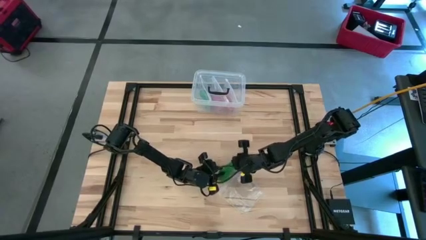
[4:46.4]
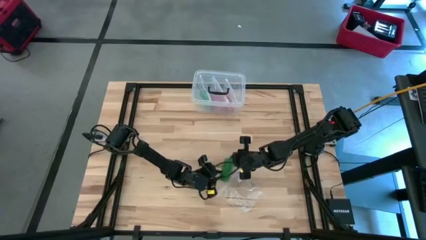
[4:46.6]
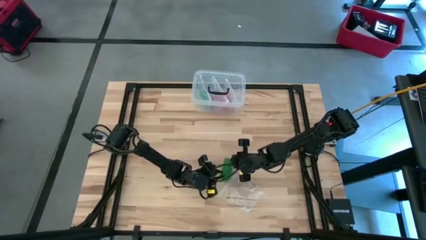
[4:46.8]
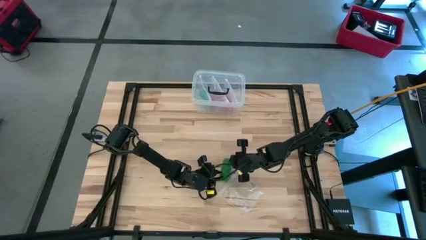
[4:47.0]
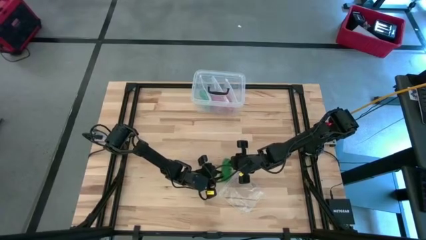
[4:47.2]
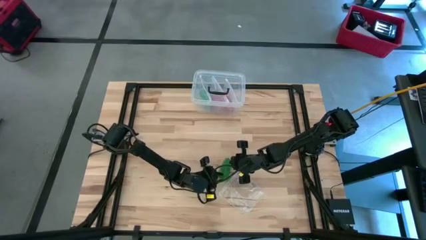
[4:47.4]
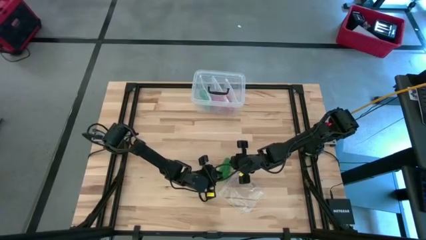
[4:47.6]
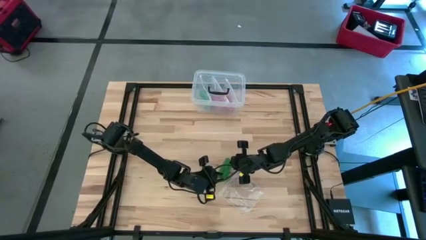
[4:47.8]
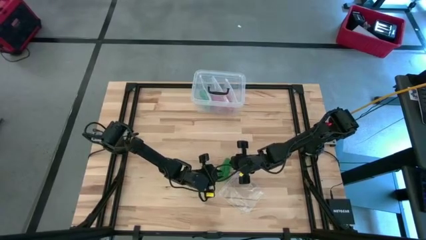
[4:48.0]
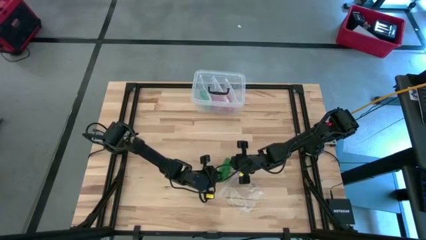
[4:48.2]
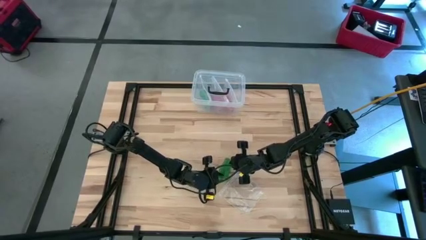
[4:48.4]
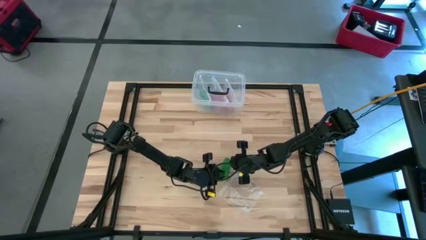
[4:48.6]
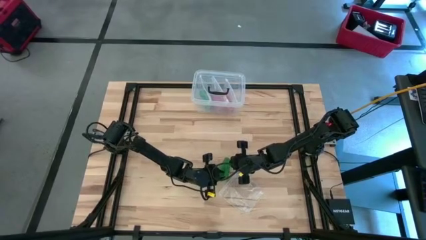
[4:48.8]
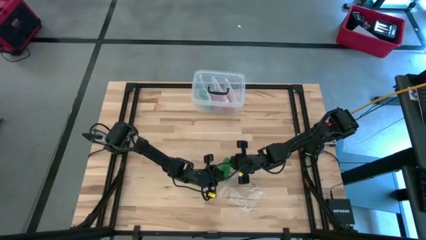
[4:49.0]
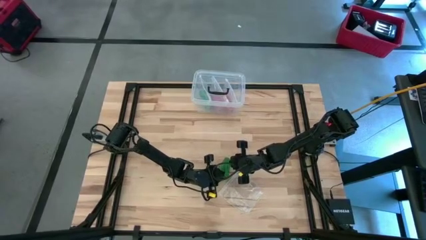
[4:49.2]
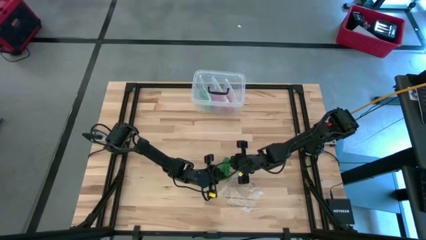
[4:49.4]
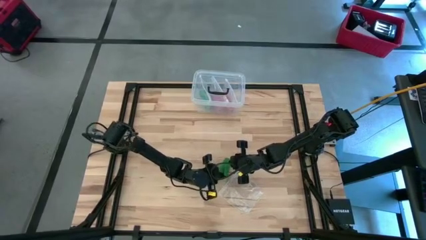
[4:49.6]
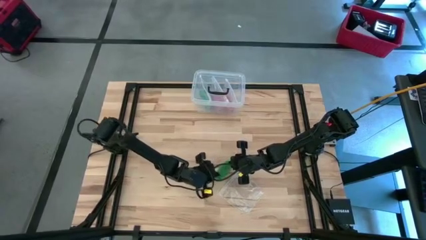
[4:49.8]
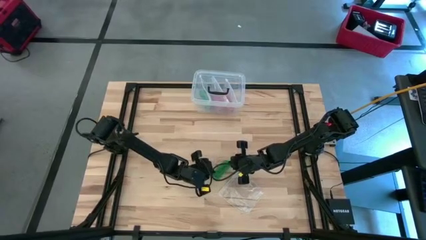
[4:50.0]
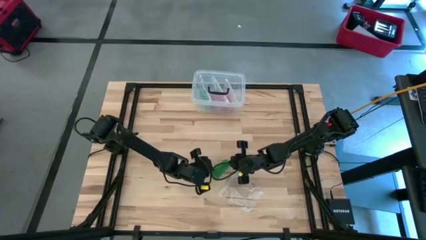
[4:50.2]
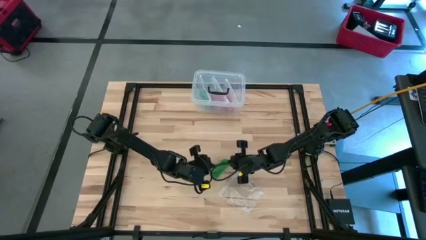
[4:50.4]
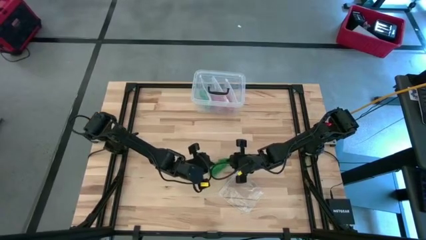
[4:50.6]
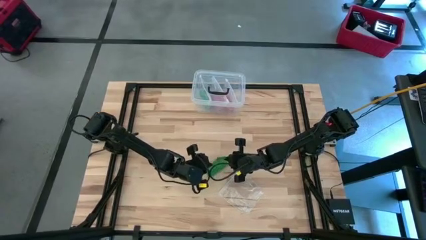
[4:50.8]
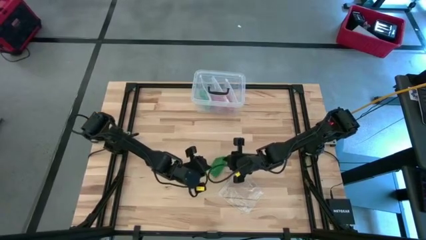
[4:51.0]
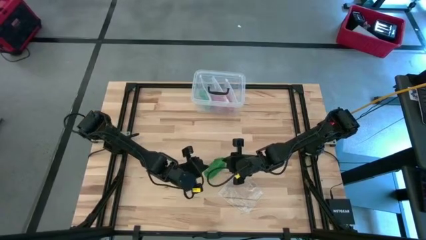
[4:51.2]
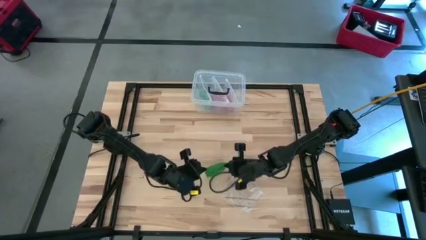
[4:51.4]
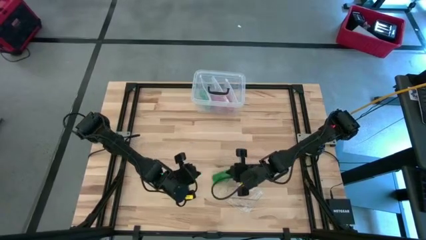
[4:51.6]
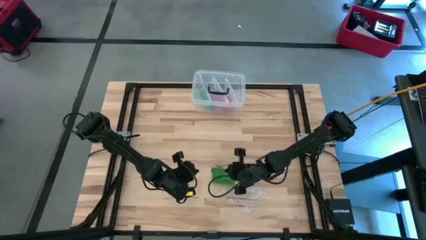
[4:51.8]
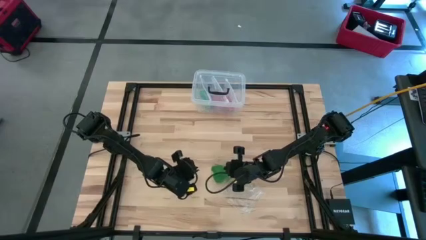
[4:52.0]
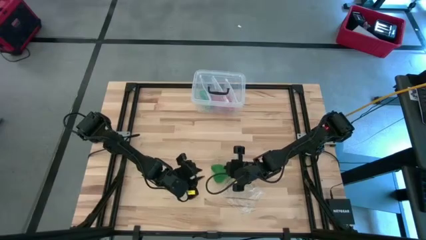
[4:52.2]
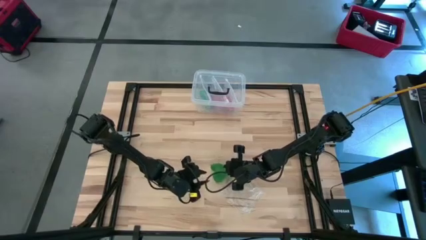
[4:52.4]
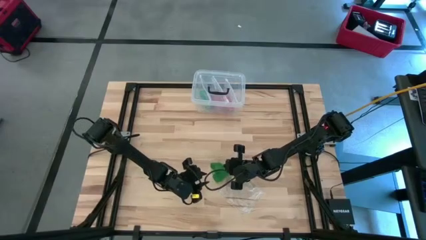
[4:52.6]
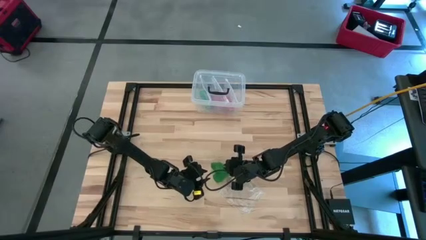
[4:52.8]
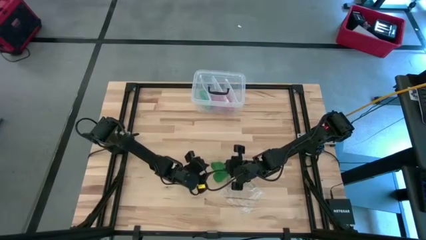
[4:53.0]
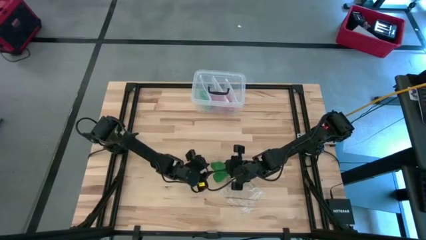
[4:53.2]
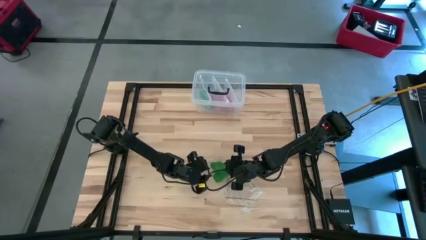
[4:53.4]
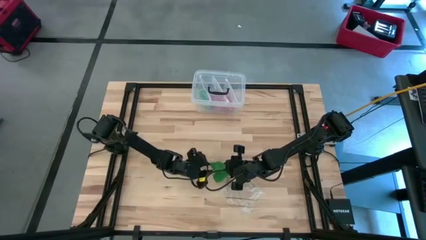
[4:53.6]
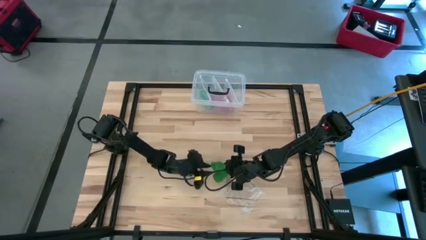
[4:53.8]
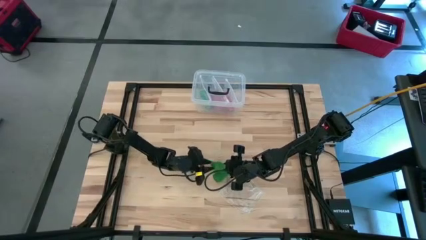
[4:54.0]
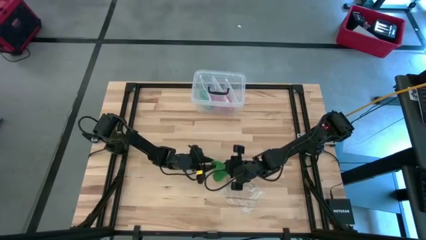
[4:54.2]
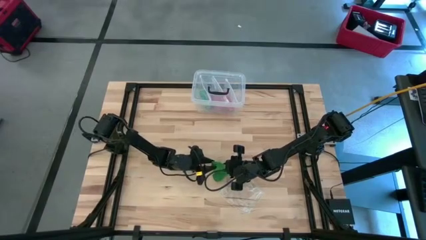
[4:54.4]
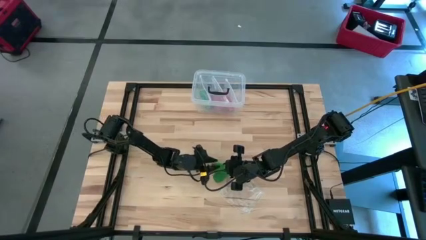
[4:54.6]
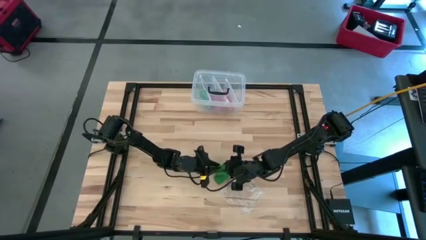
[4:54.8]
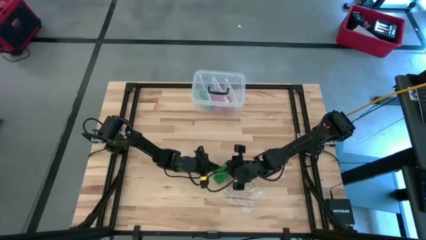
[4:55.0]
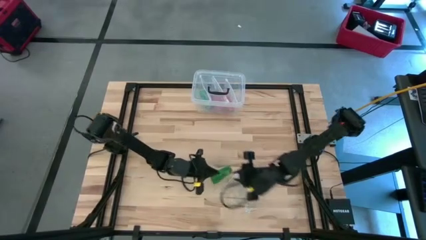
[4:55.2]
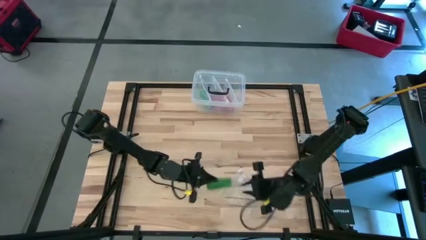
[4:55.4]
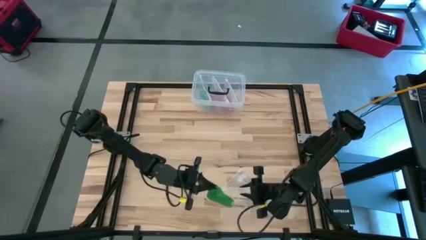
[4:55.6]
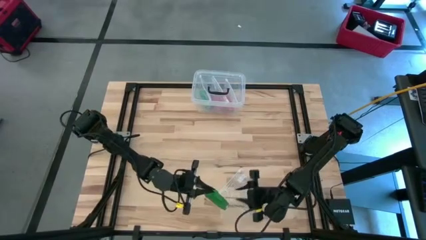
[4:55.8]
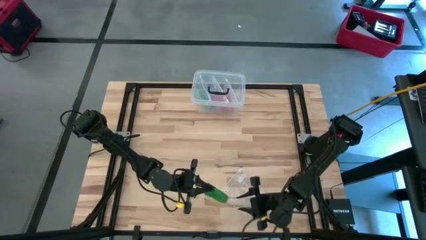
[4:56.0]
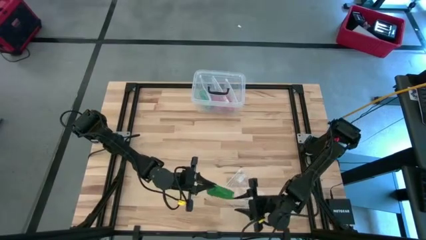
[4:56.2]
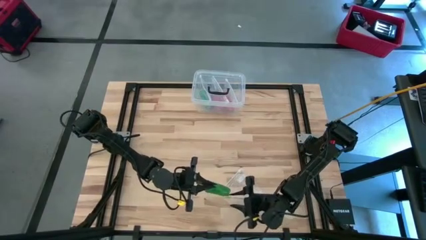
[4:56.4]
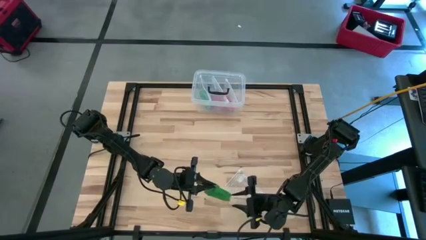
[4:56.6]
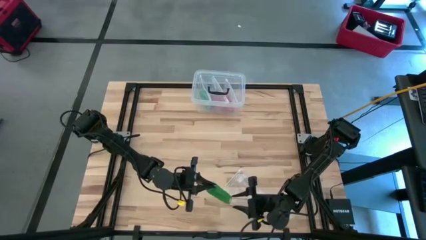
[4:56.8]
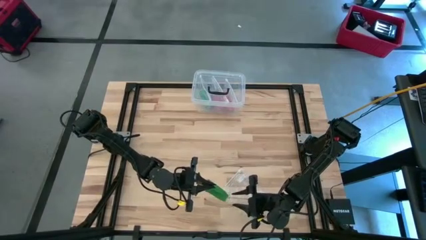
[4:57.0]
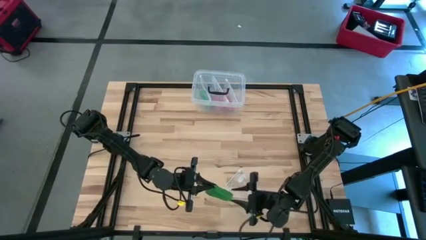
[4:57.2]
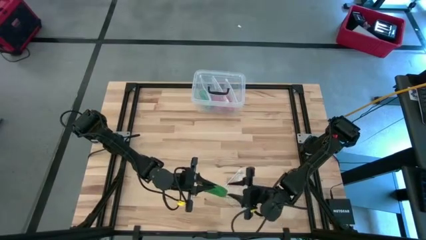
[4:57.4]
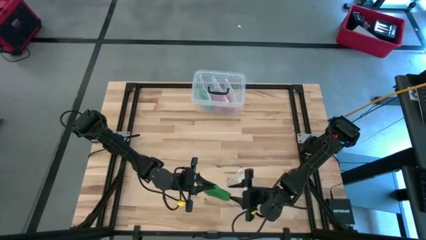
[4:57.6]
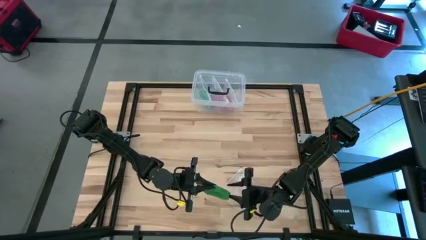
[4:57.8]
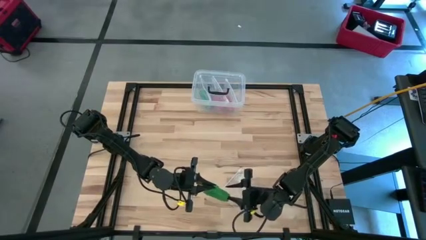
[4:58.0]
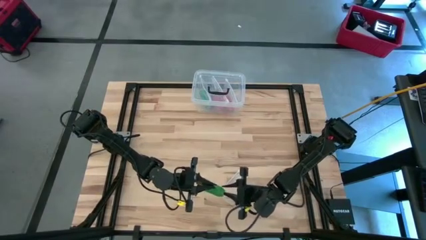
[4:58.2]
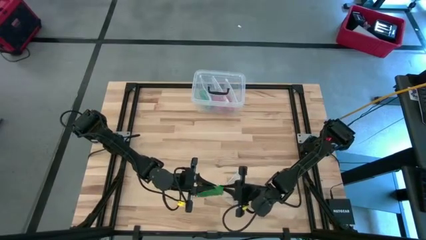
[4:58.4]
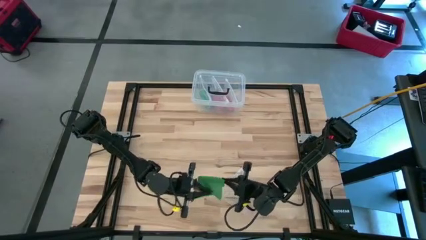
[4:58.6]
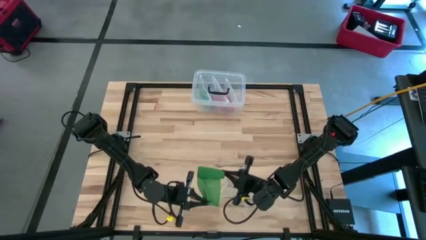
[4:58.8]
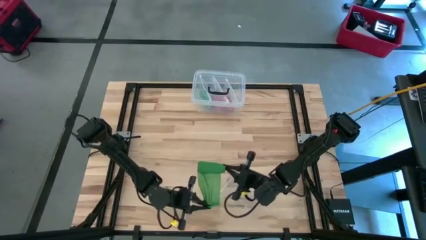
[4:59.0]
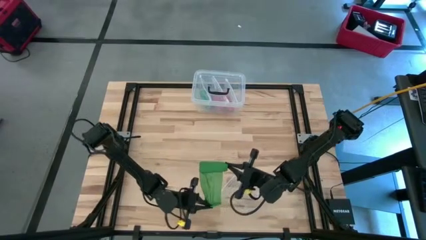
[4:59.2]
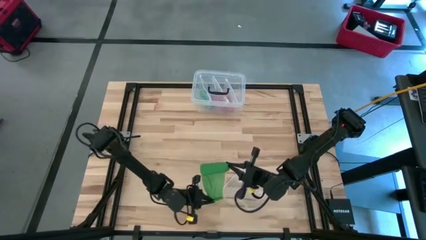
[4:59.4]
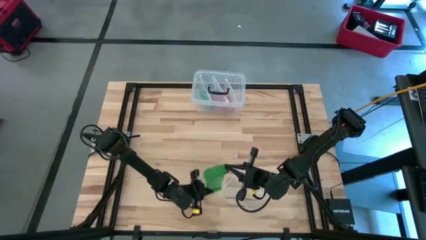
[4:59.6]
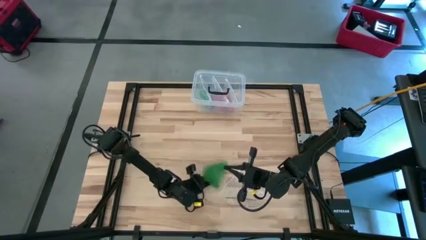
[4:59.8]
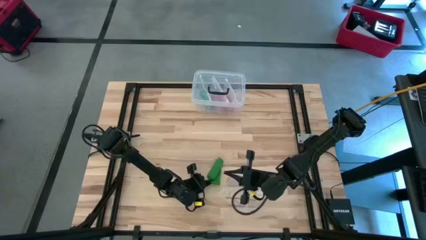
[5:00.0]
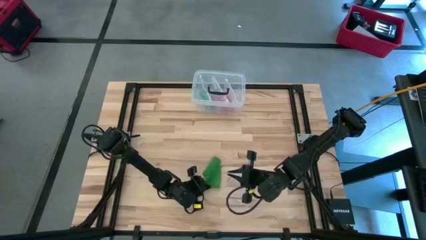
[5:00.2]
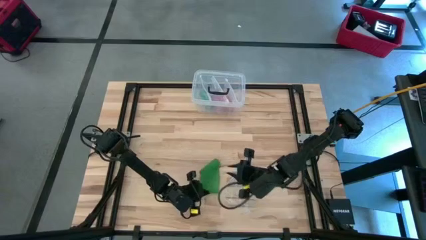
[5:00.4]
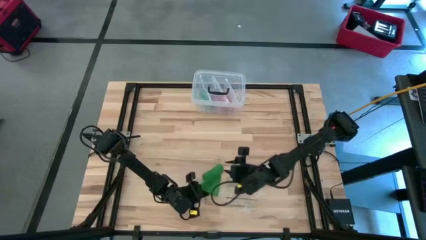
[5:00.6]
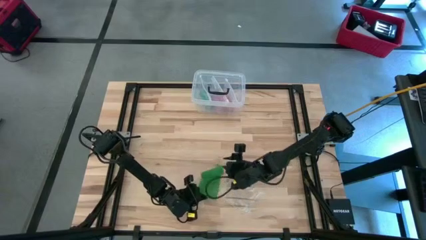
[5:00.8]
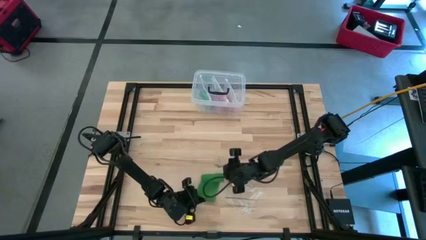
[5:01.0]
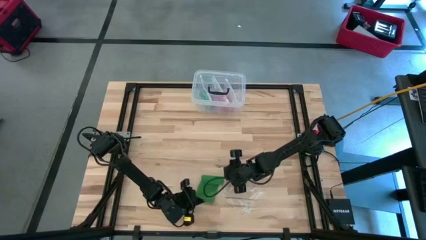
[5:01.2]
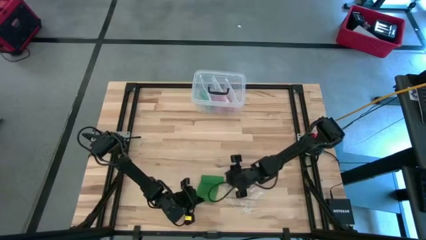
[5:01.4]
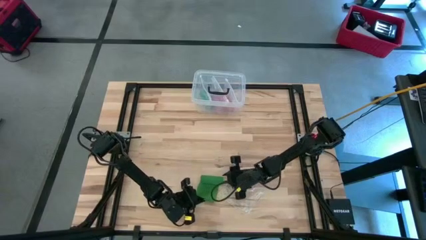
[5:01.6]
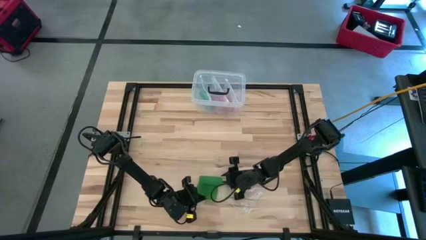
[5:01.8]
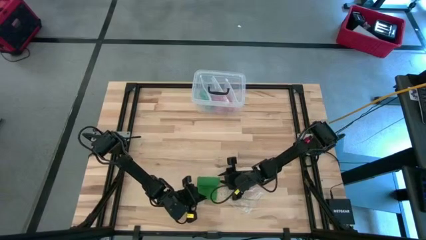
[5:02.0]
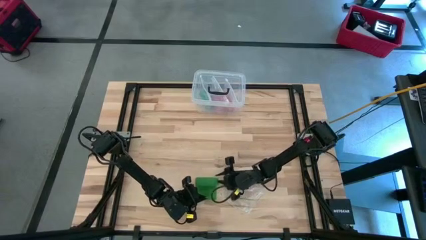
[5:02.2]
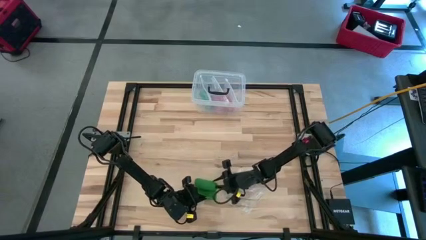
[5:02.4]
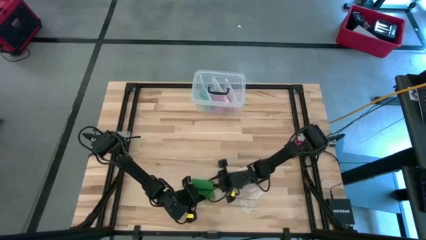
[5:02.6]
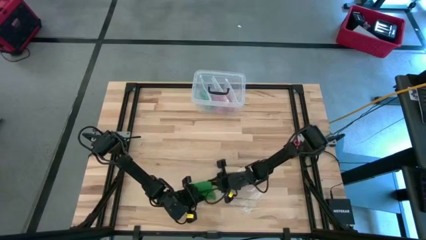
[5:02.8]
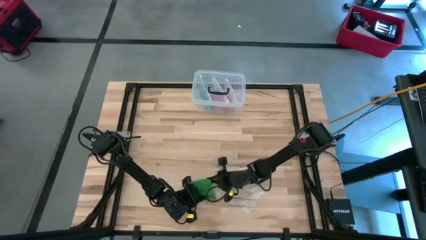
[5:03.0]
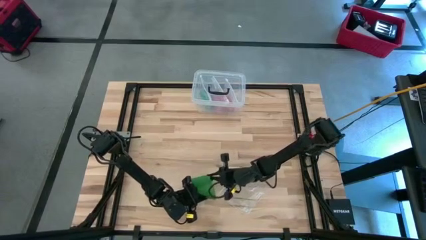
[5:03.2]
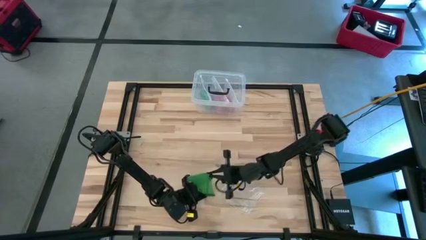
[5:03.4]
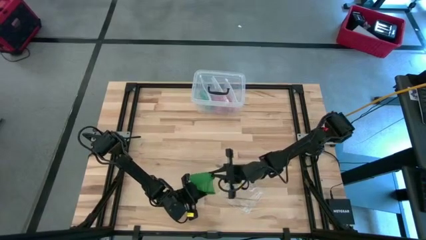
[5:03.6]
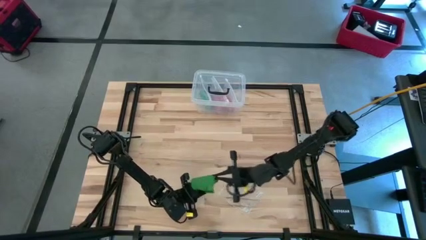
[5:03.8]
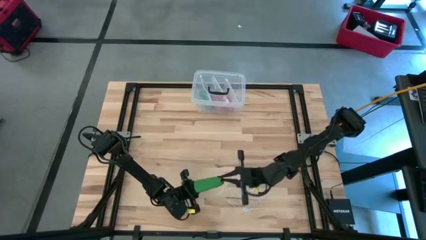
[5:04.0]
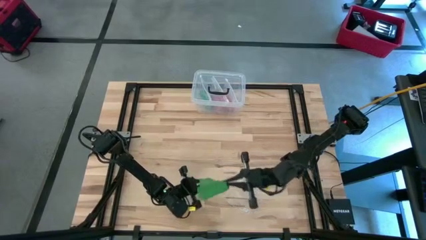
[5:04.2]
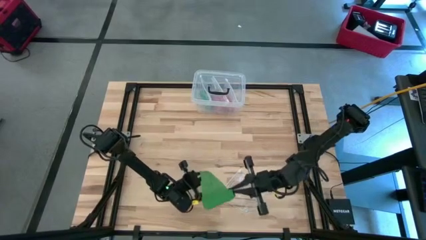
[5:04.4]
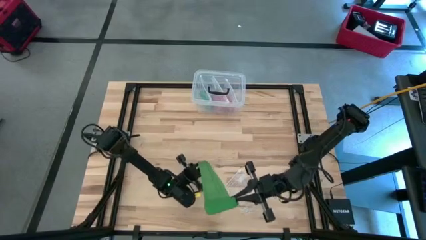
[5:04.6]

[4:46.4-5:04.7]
Task: Roll bandage
Roll the green bandage
